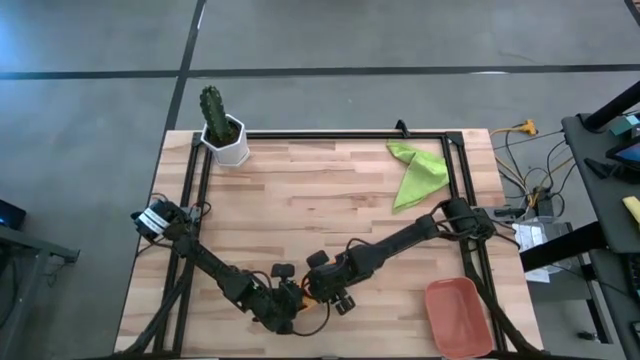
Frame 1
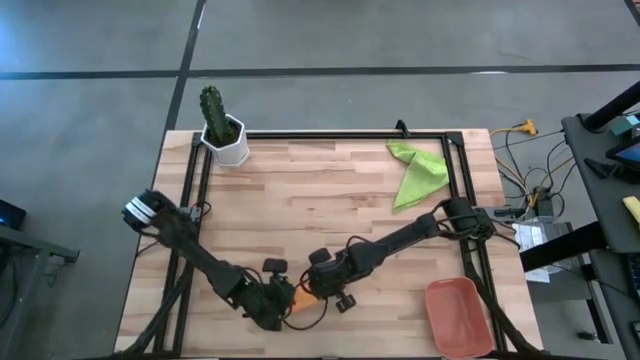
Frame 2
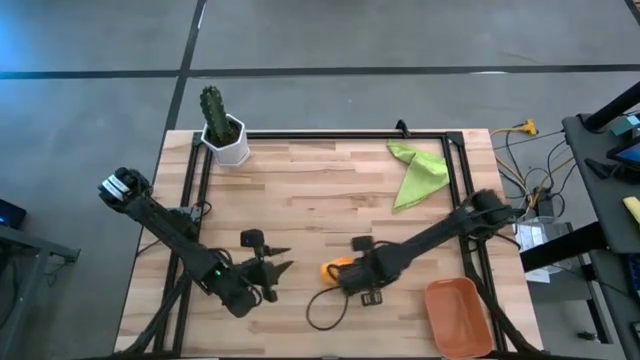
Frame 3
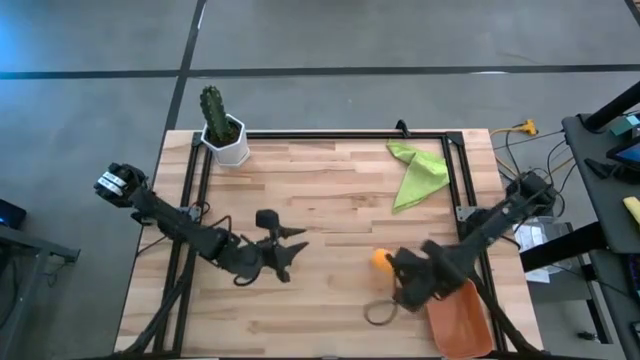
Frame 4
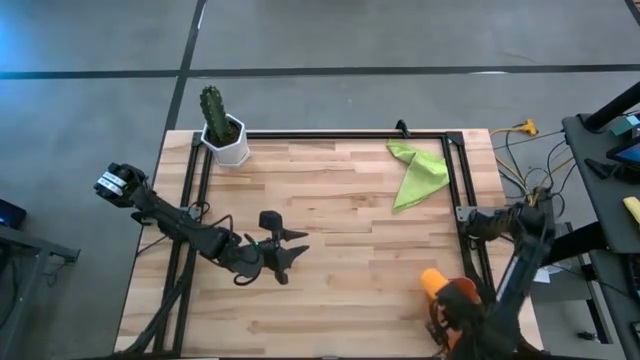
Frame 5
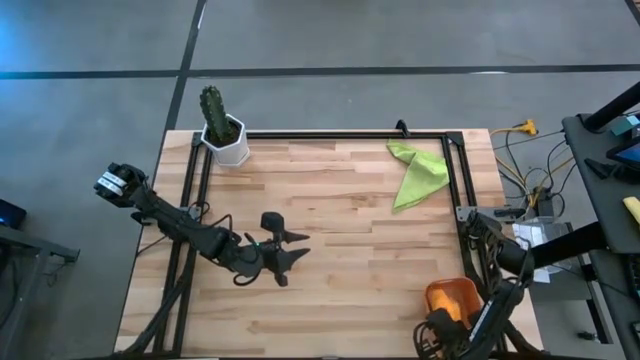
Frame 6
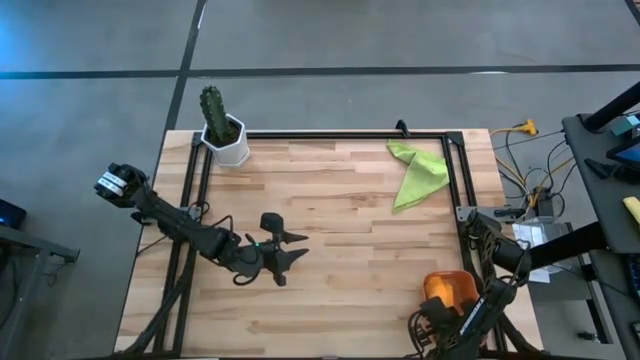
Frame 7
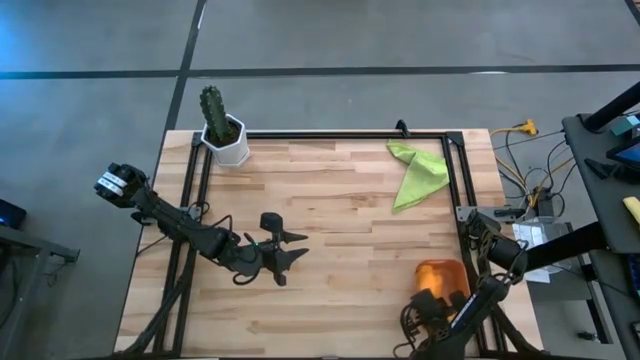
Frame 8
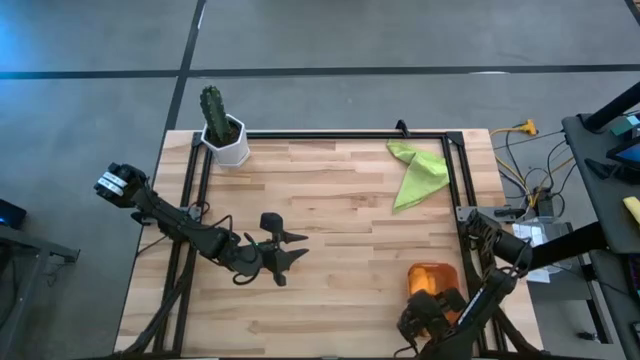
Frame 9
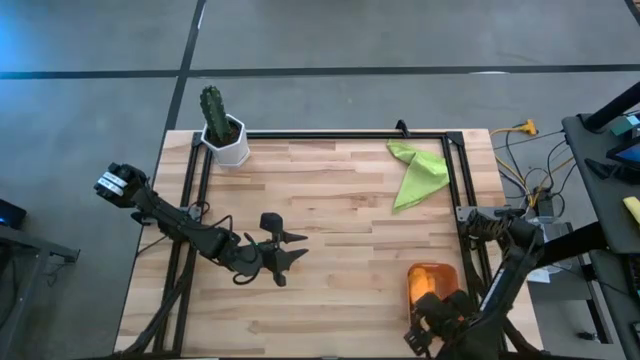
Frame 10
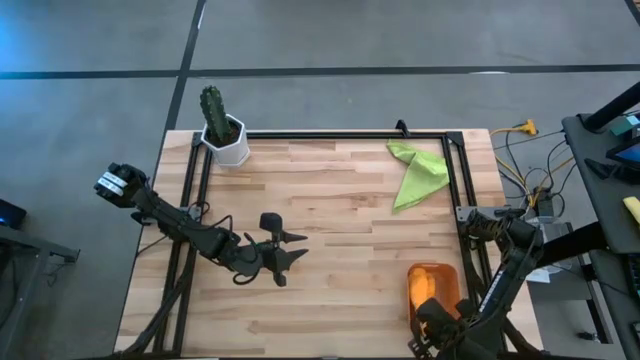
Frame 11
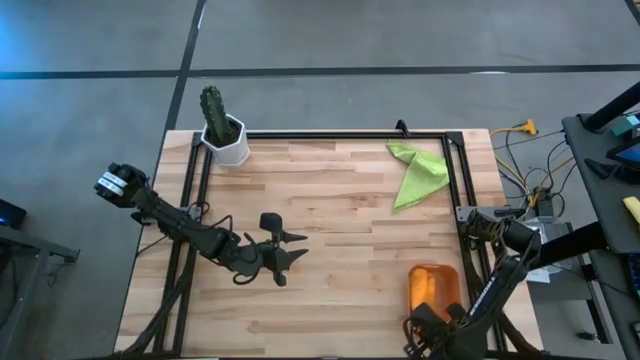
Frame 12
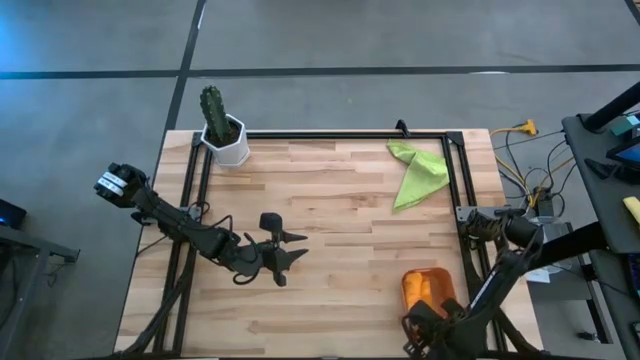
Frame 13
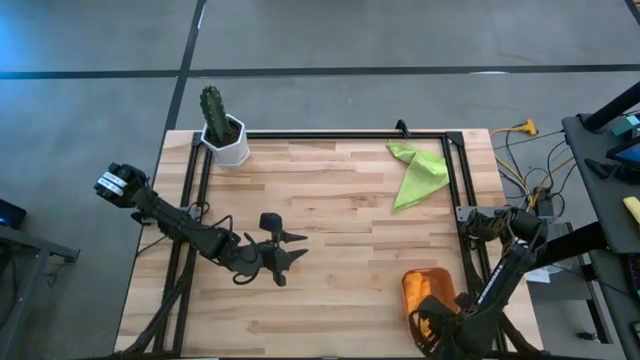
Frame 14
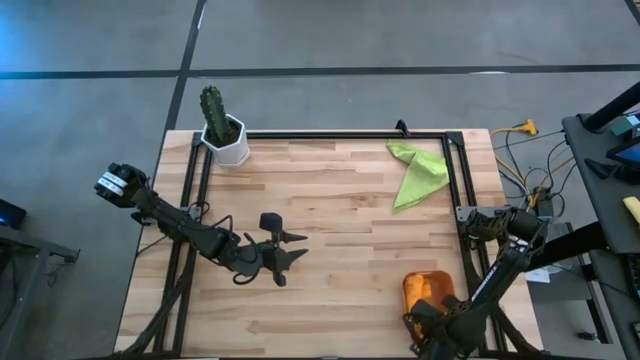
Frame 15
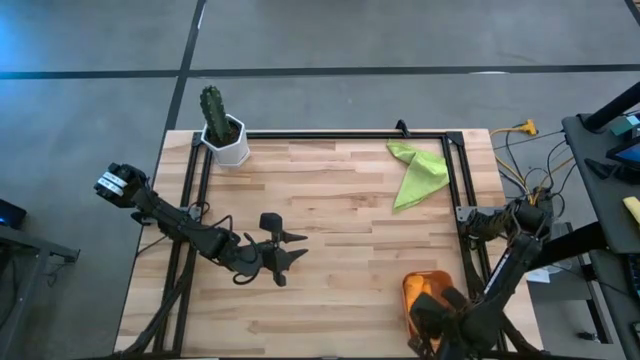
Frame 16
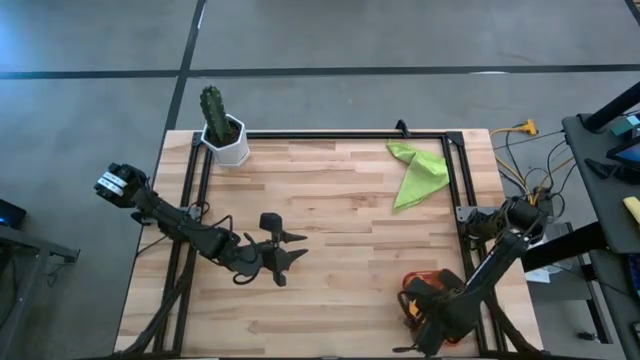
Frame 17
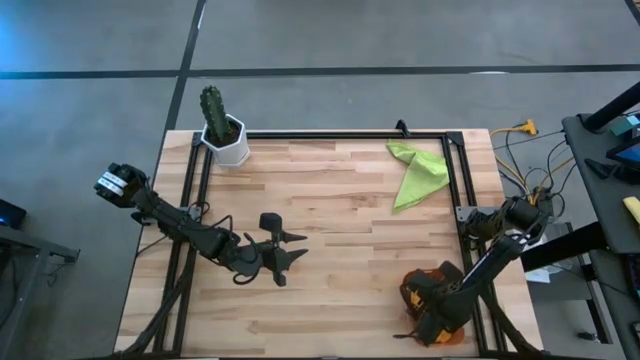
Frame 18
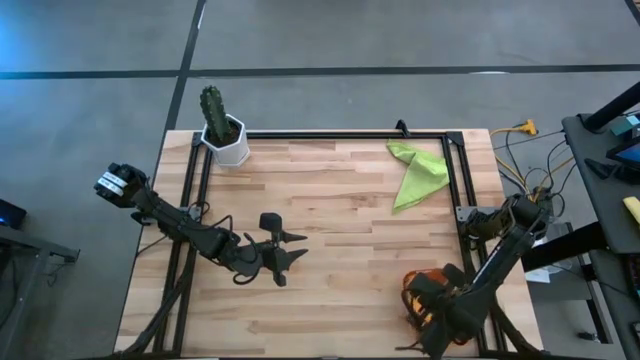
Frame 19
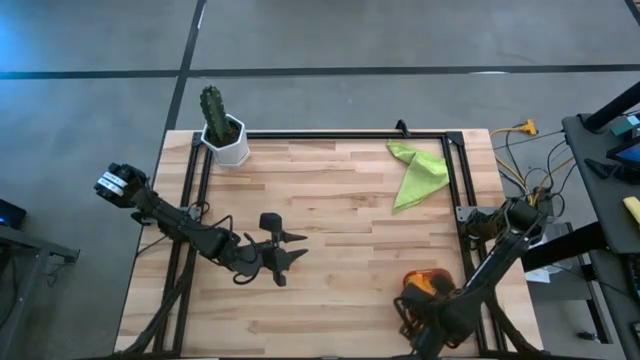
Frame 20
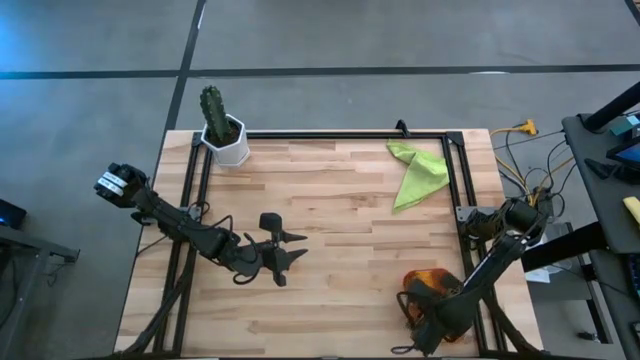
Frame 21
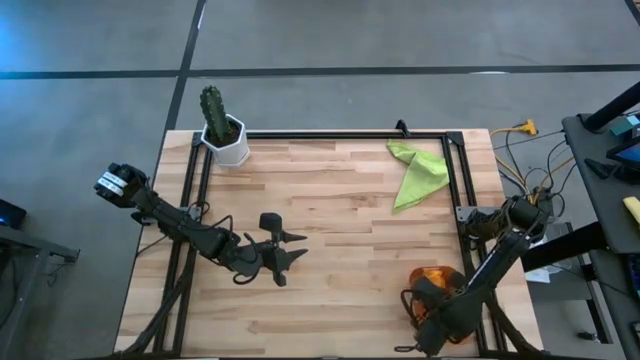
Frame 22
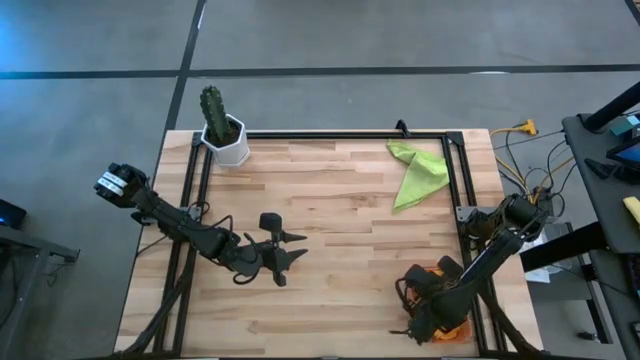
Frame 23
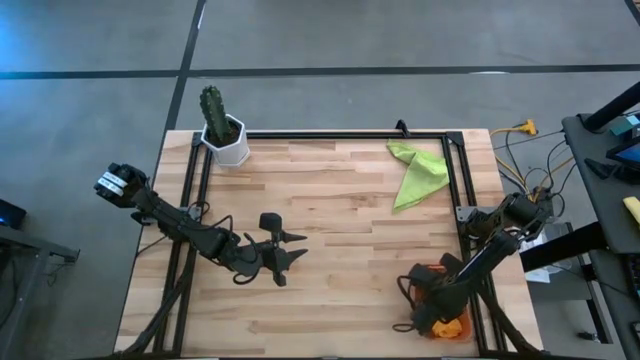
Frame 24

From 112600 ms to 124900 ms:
Task: Roll microfiber towels into tight, uniform cylinder then place into a basket
Put the orange microfiber cloth into the orange bin

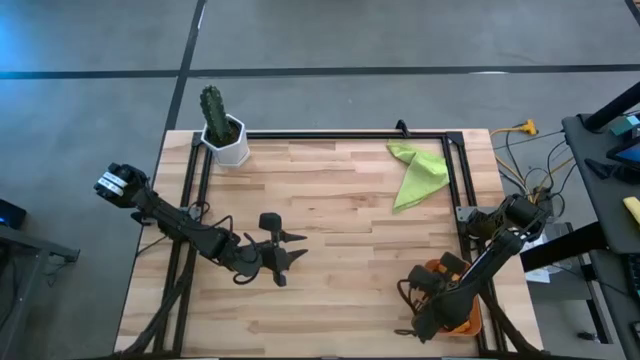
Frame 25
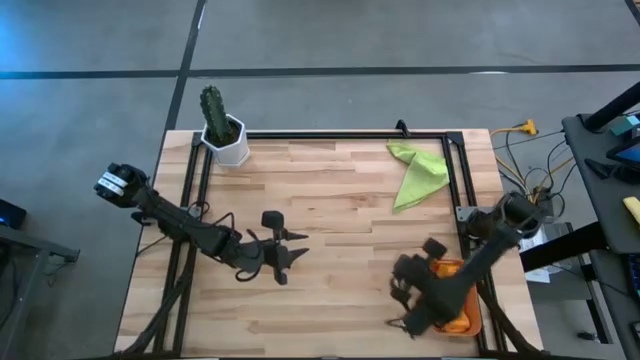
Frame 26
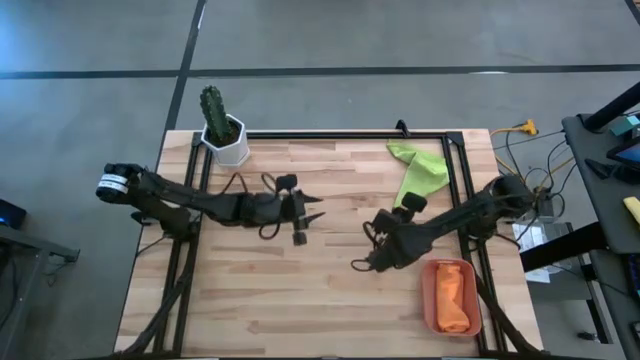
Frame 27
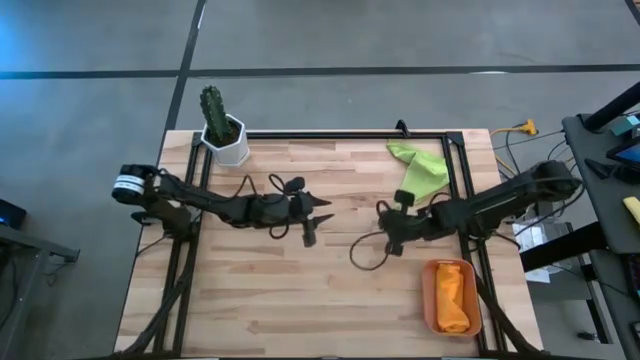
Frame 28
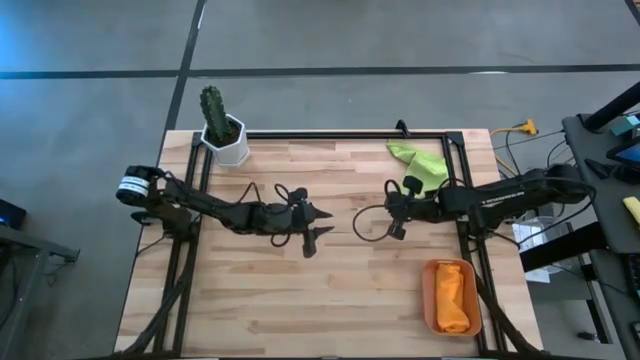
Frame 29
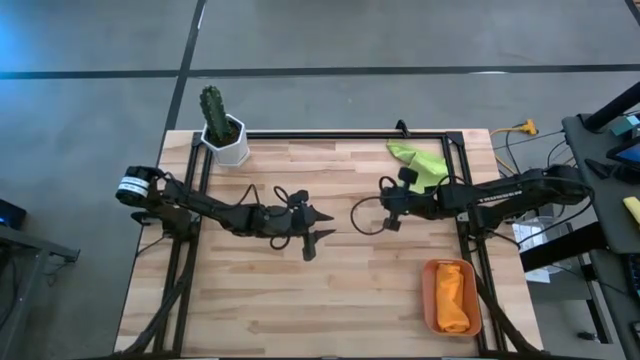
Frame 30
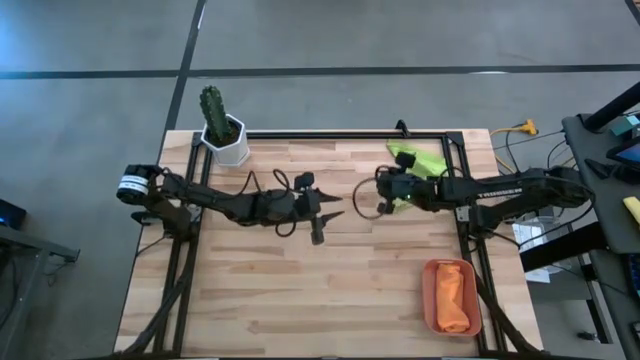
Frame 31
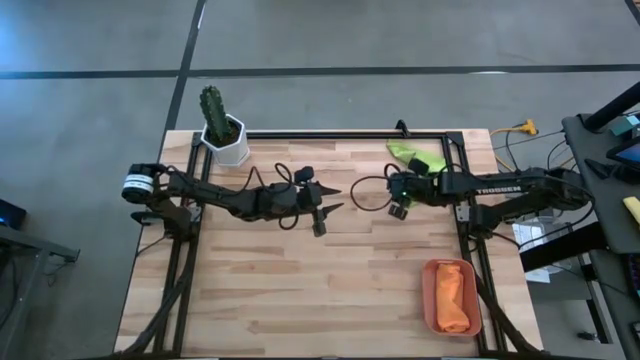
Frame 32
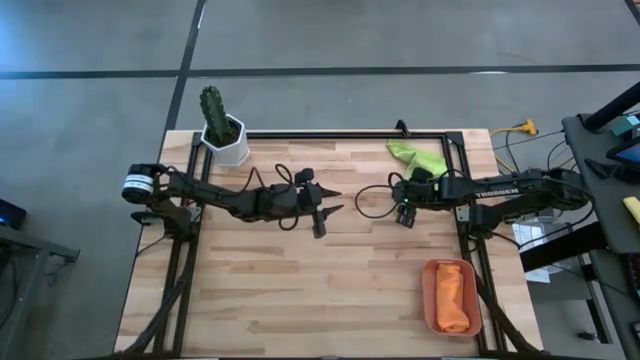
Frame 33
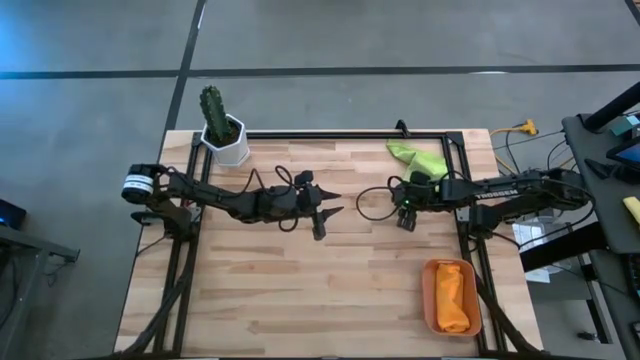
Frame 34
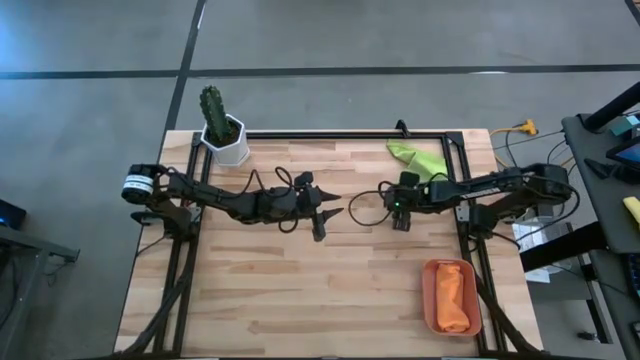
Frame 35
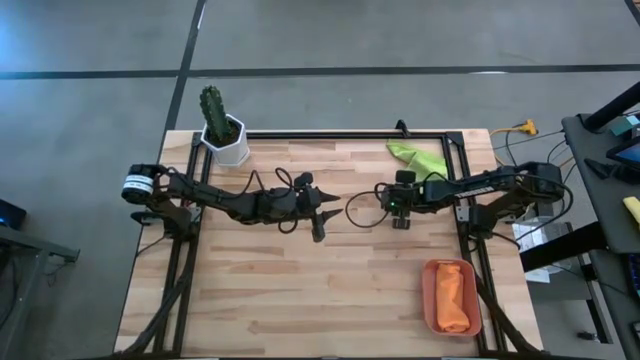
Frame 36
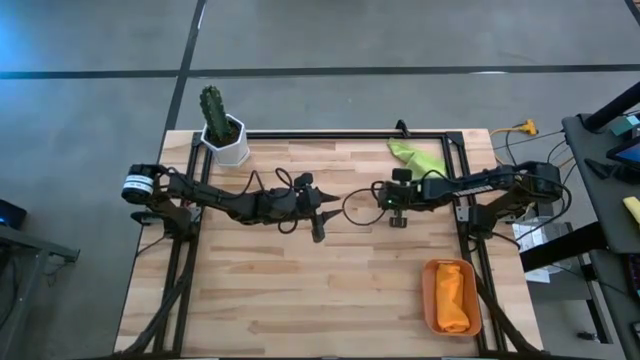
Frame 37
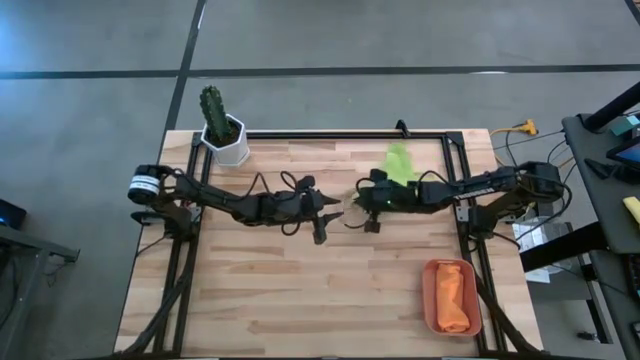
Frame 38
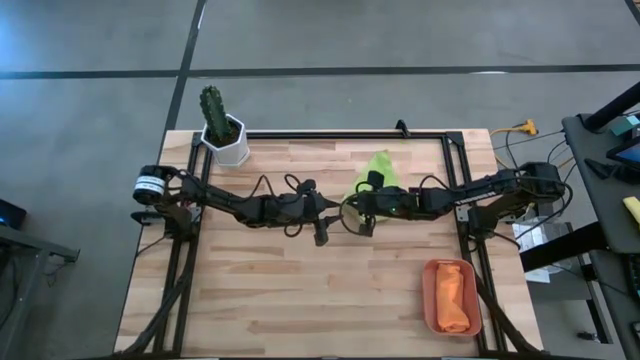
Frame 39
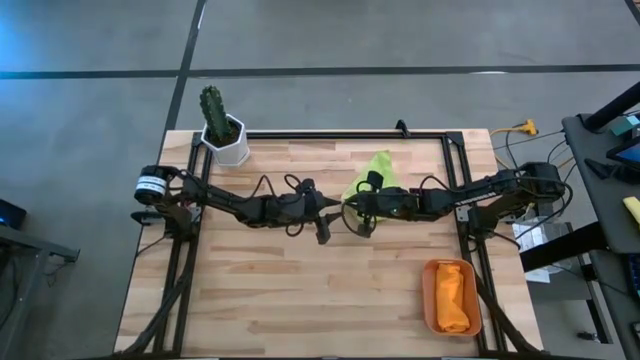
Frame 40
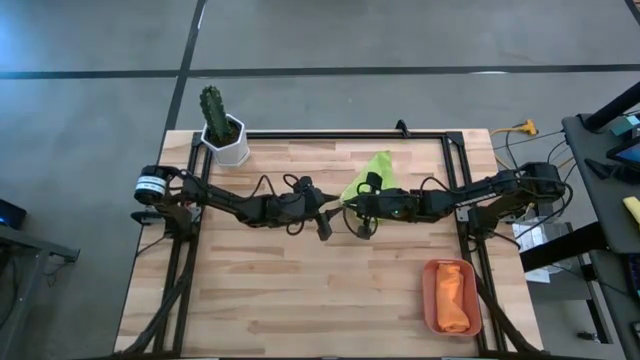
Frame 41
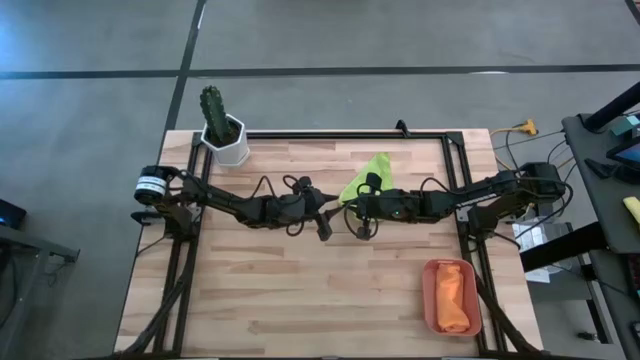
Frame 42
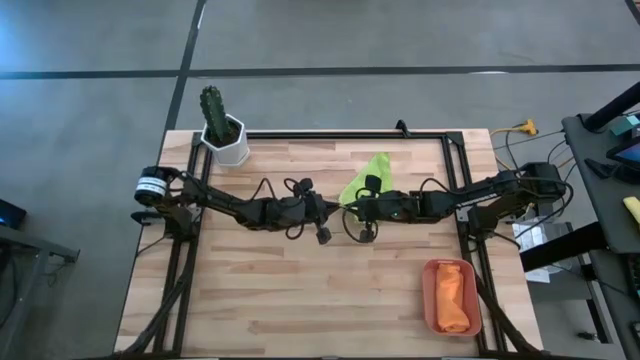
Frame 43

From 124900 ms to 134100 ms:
Fold the green microfiber cloth
